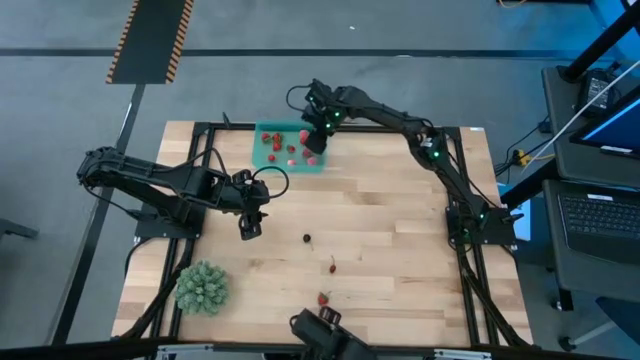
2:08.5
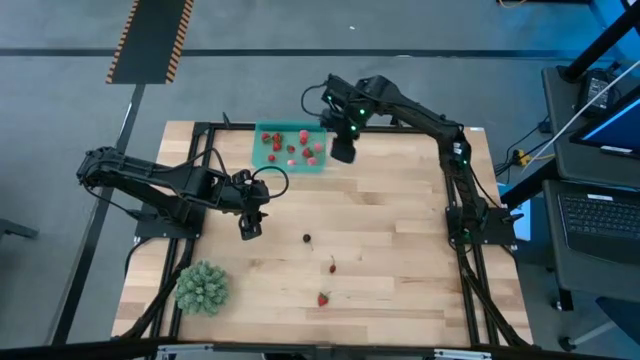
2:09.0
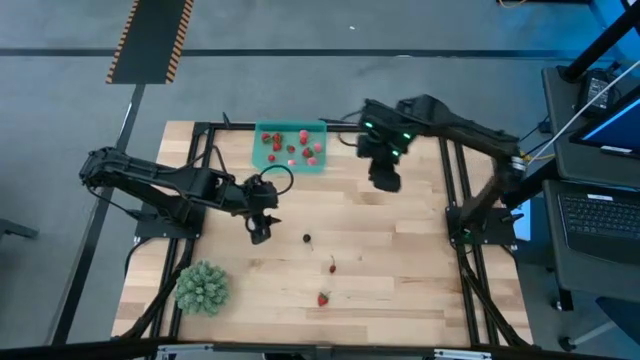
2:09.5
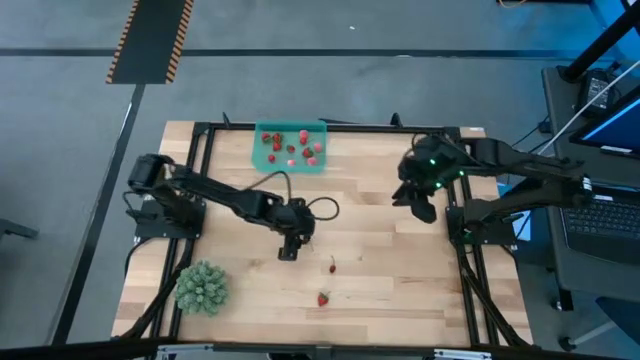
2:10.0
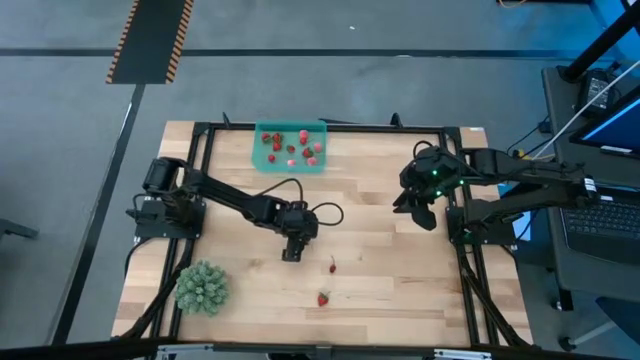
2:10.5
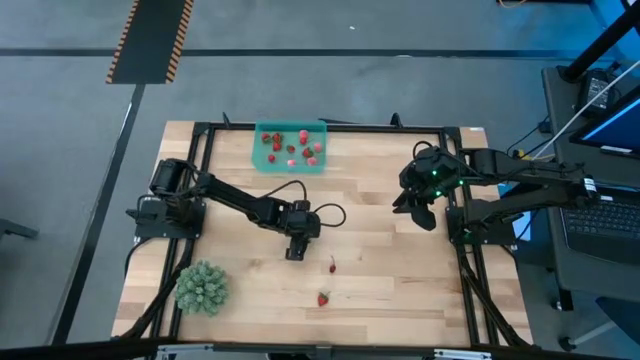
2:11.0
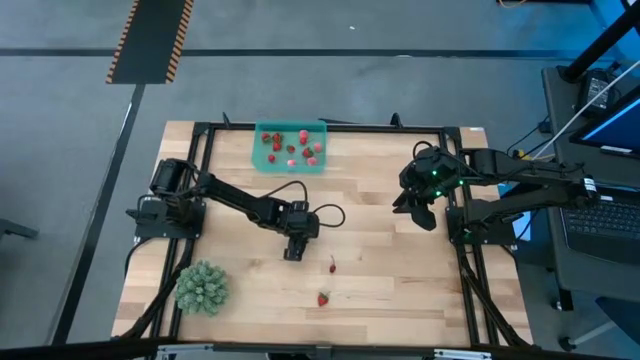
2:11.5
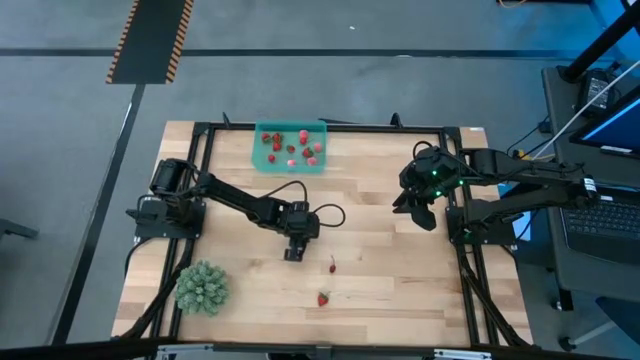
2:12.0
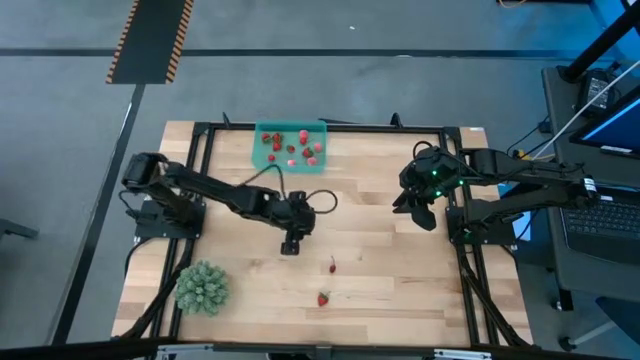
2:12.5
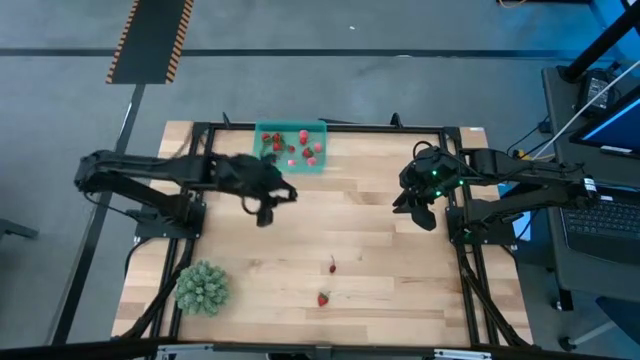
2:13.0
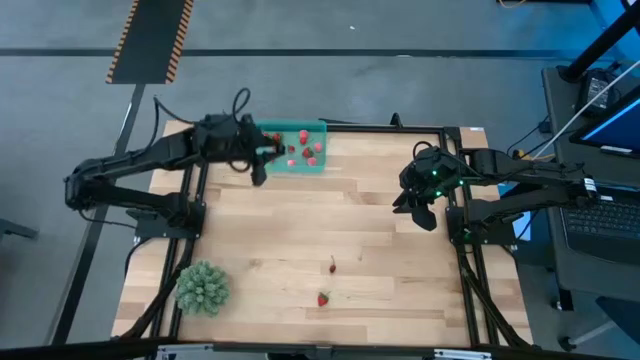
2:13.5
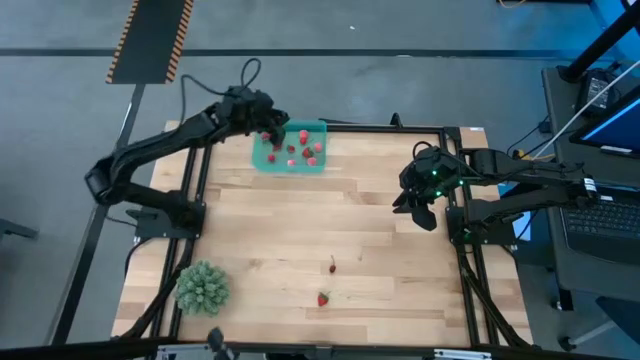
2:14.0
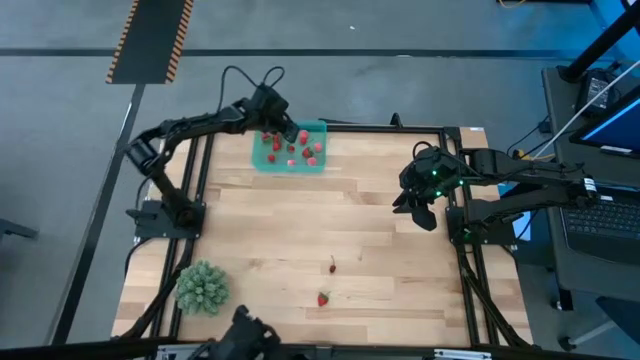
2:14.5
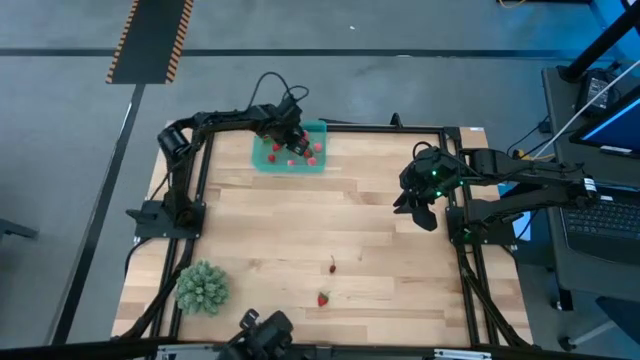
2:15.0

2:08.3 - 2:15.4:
Task: Pick and placing Produce into tupperware
Put the black cherry into the blue bin

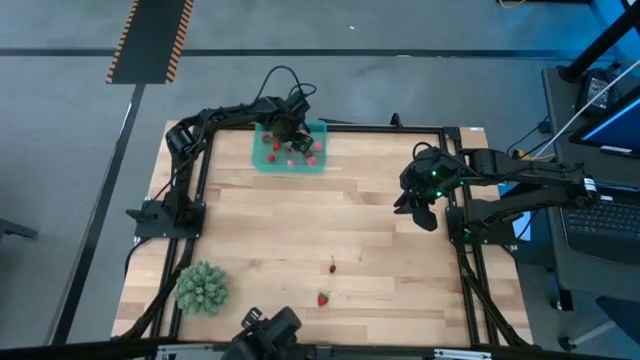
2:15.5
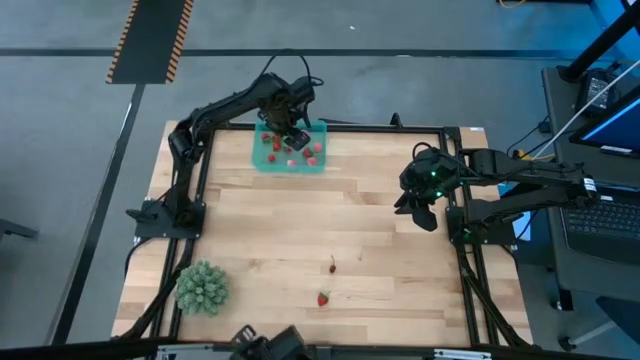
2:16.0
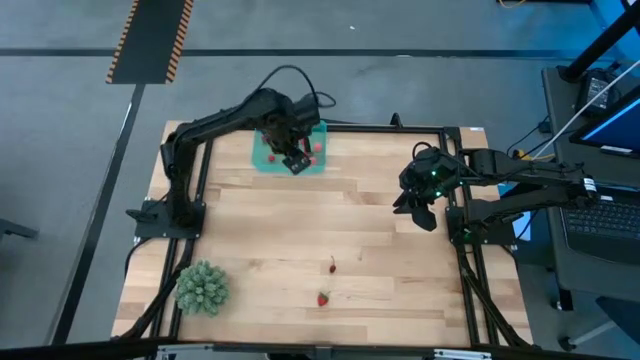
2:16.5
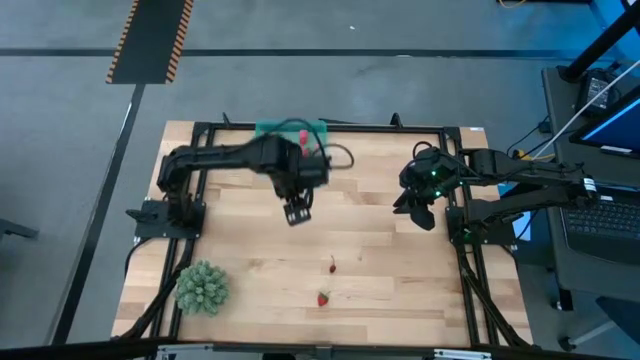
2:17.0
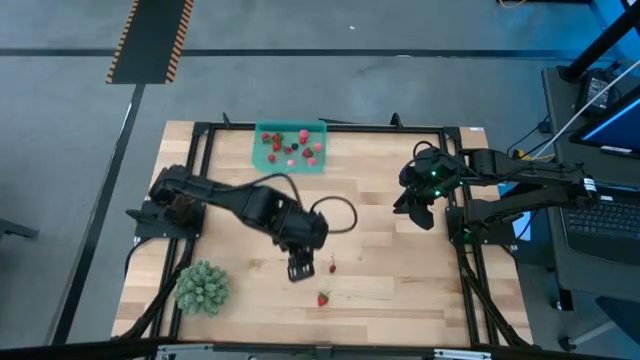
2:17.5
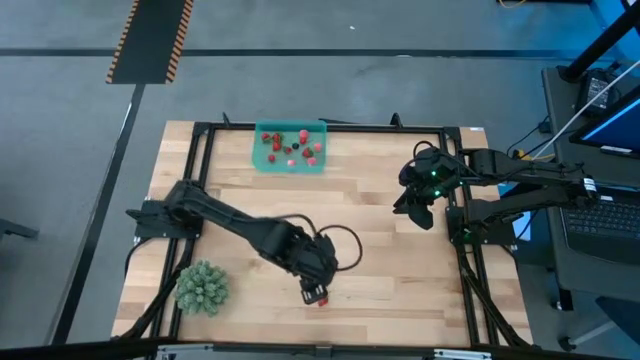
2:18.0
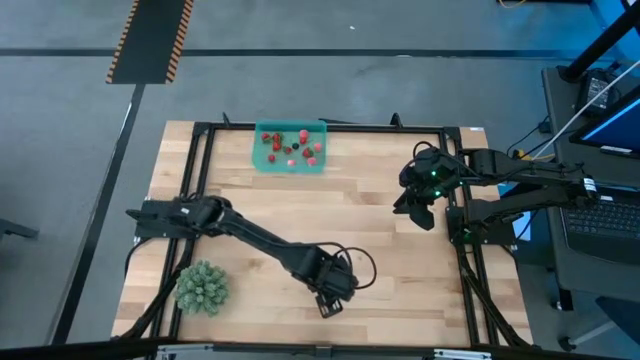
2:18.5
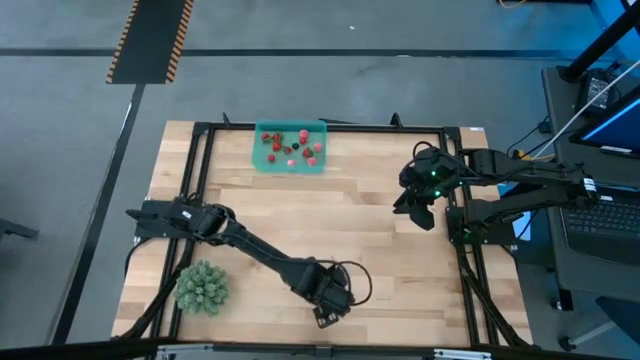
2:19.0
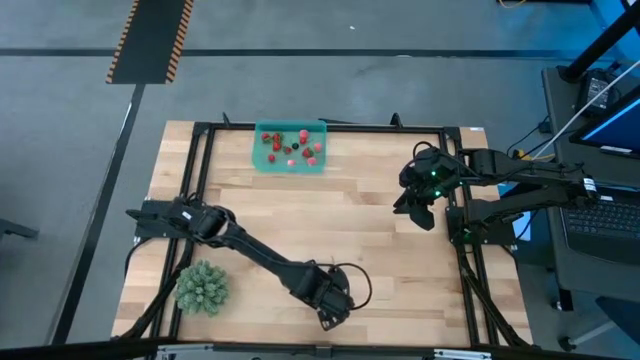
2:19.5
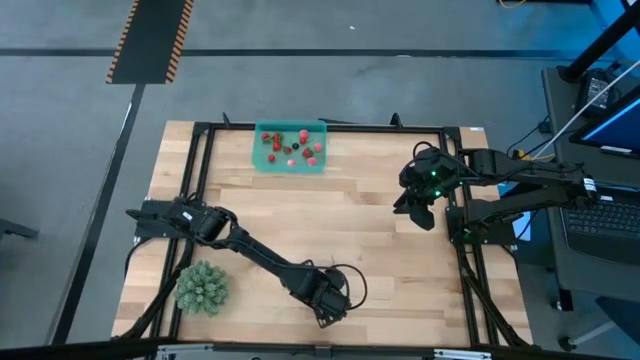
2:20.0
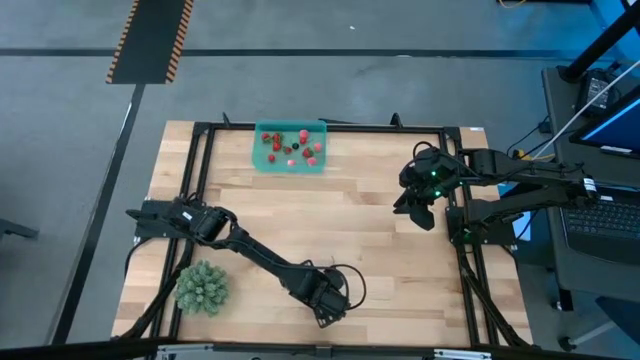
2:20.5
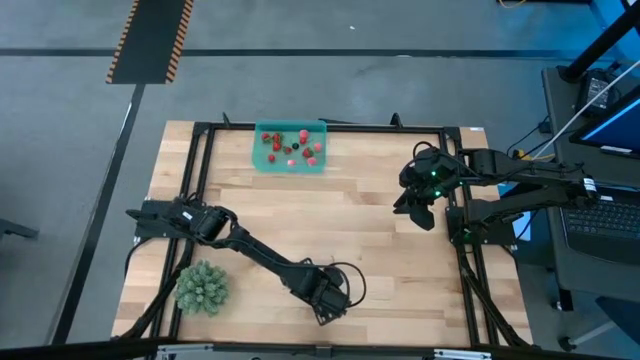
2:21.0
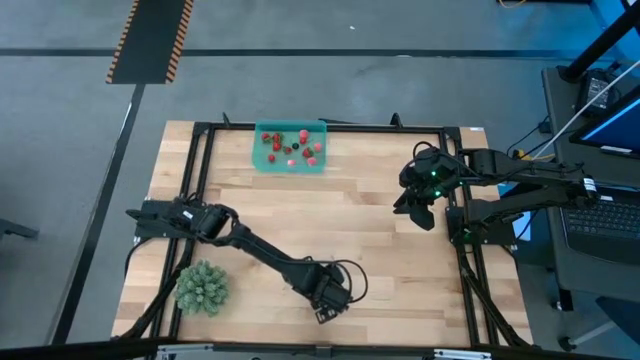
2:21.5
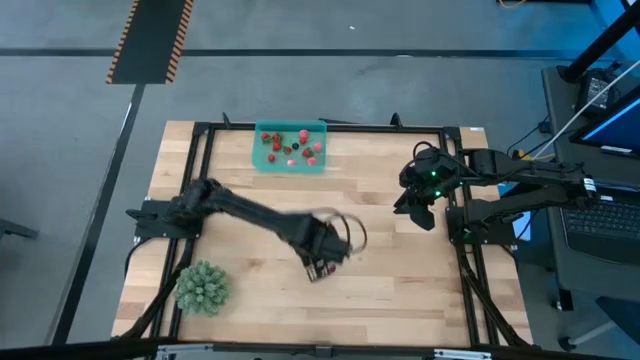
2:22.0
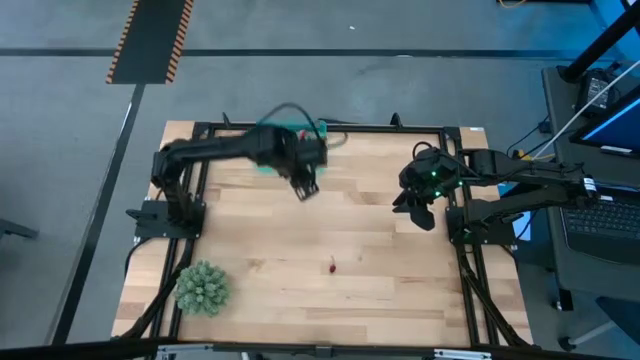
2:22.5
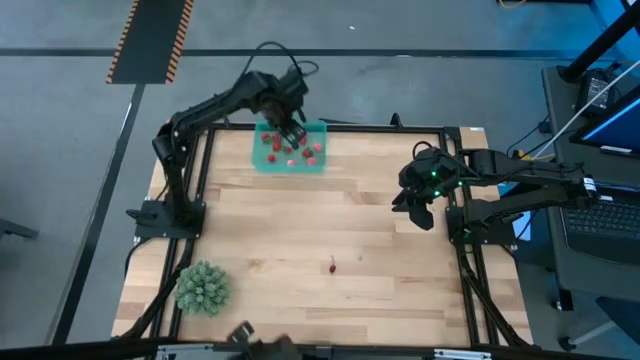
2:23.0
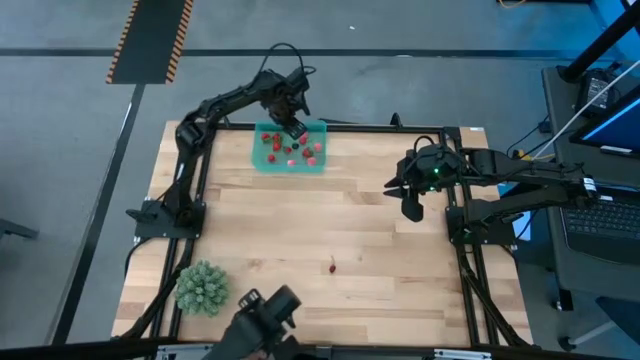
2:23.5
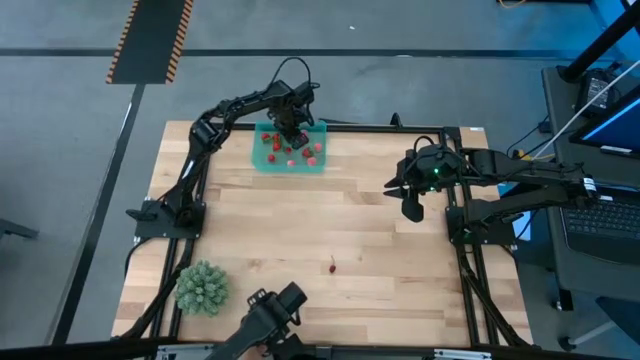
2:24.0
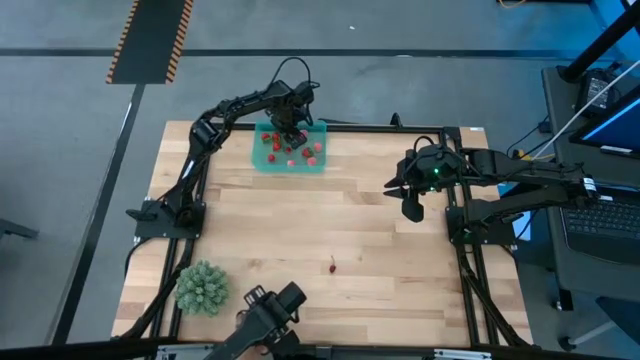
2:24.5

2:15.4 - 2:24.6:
Put the red strawberry into the blue bin

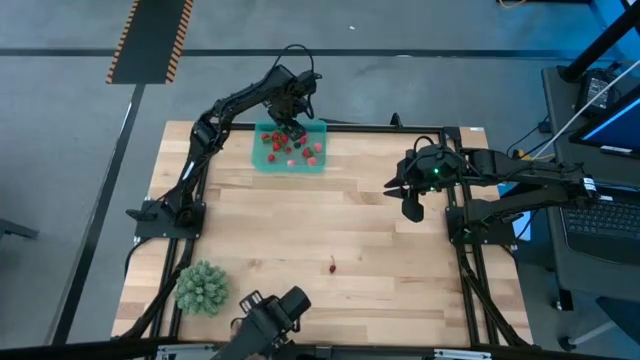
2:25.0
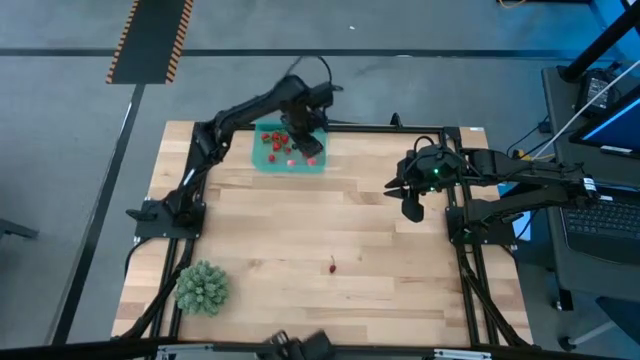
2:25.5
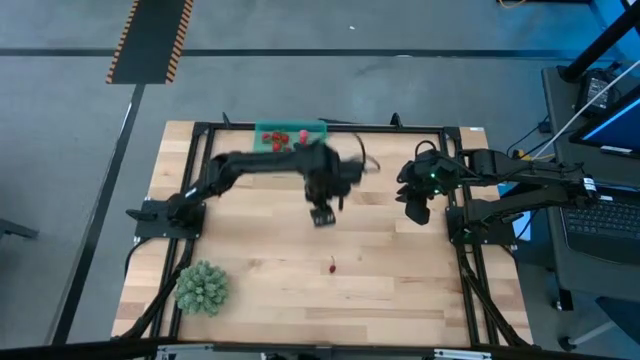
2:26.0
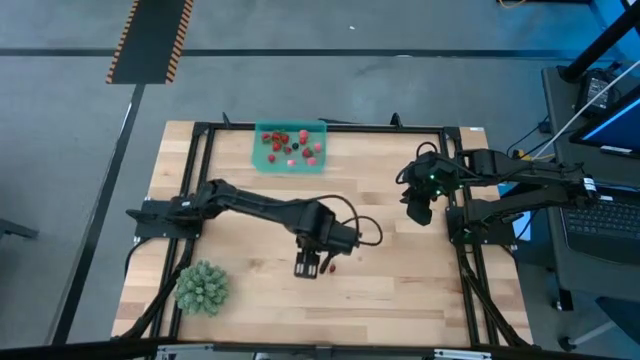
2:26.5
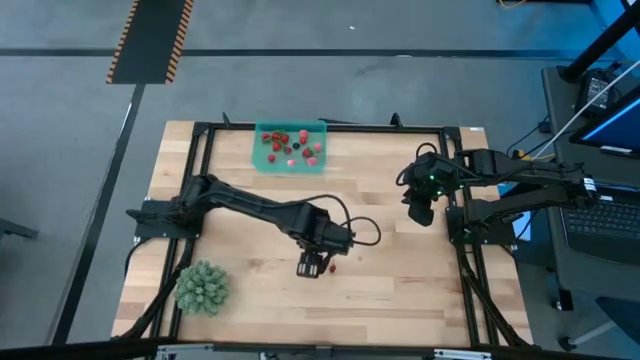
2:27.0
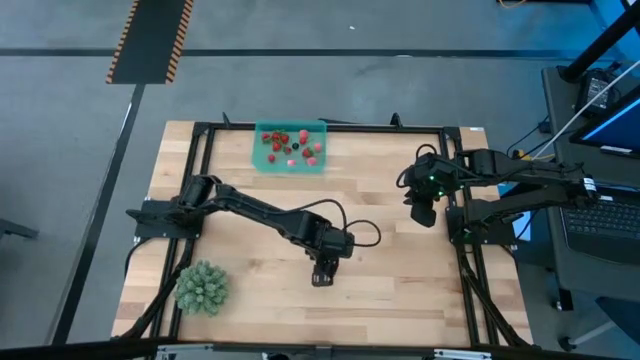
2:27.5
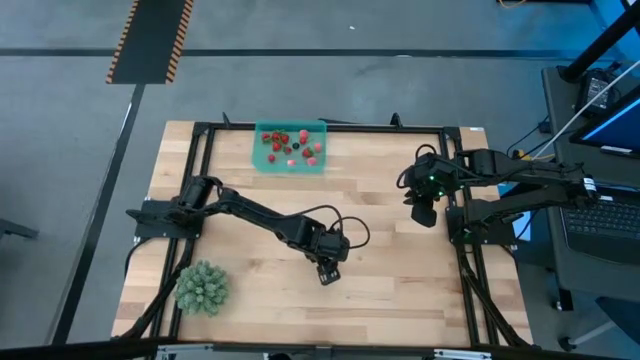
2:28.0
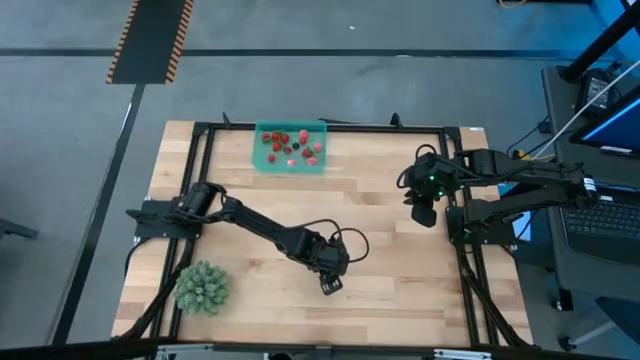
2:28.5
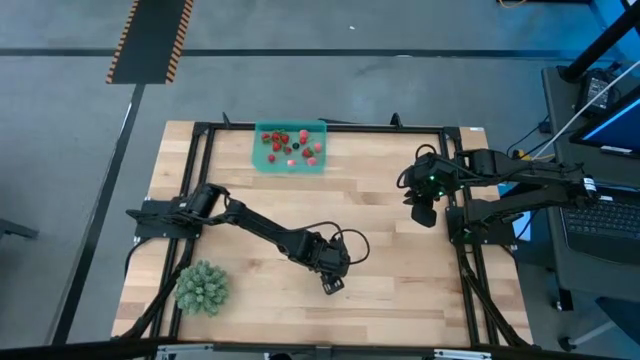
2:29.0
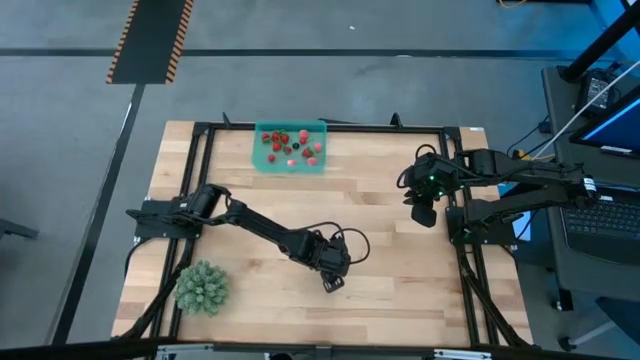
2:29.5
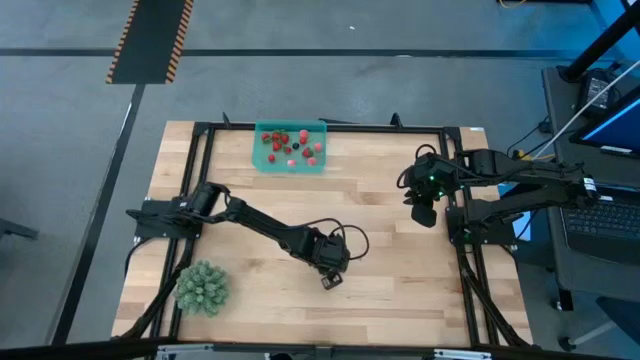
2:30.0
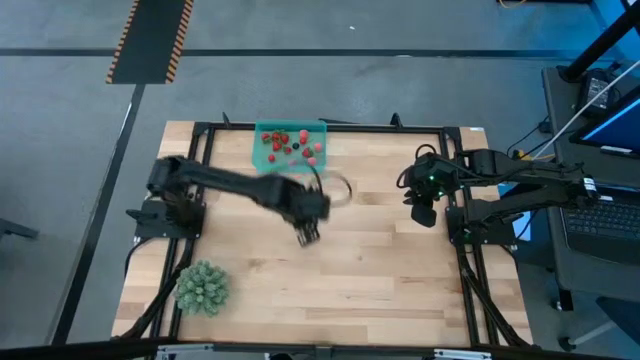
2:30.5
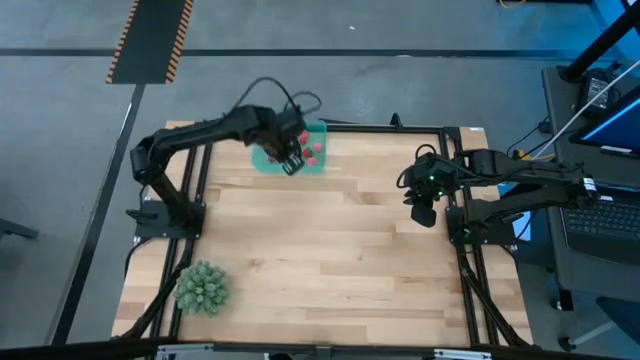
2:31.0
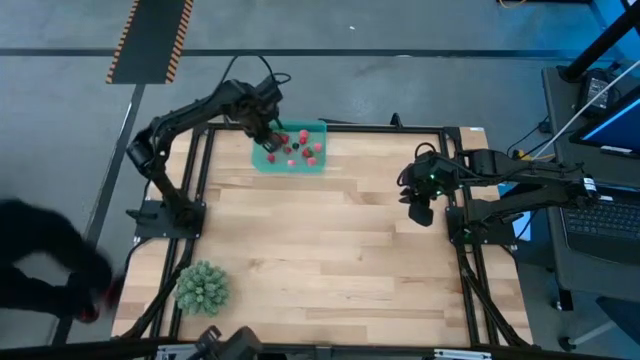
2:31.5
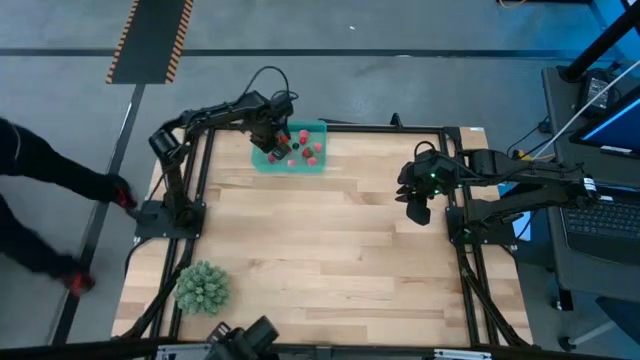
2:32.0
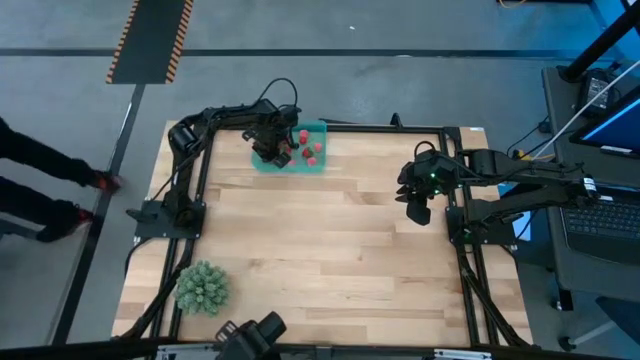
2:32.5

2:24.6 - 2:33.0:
Put the red cherry into the blue bin
